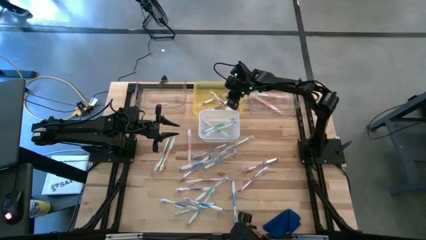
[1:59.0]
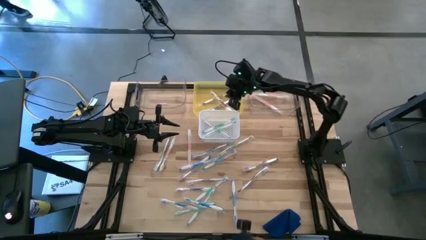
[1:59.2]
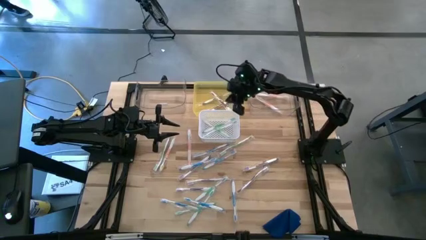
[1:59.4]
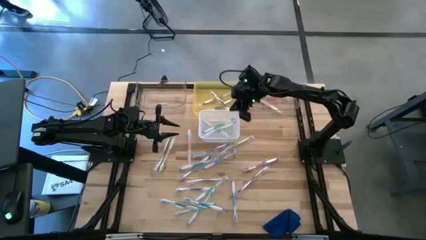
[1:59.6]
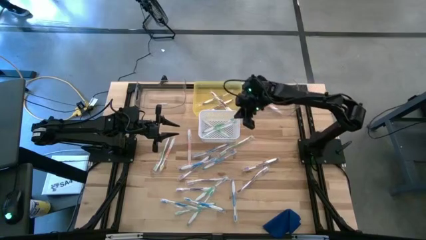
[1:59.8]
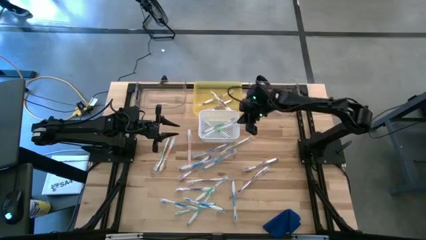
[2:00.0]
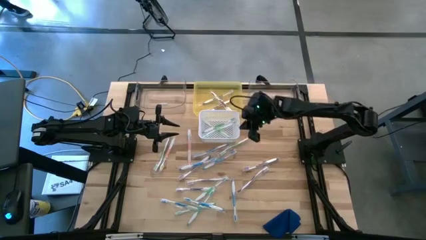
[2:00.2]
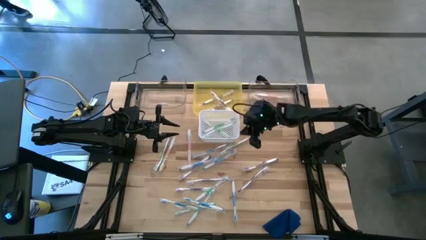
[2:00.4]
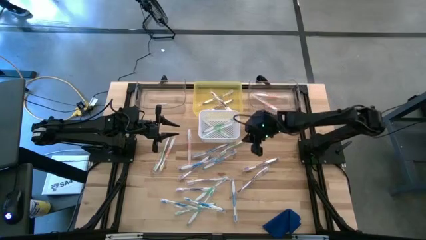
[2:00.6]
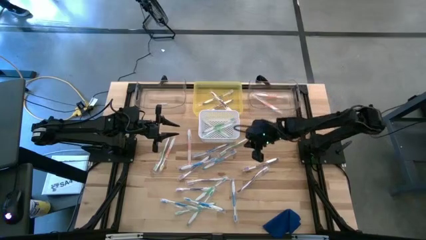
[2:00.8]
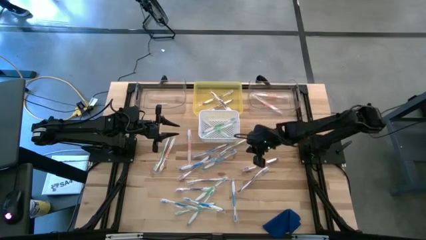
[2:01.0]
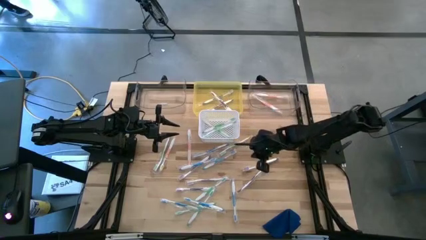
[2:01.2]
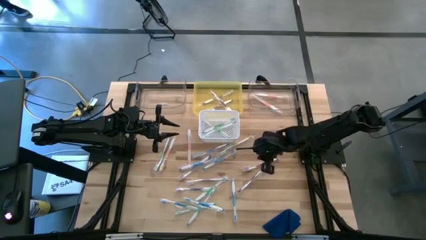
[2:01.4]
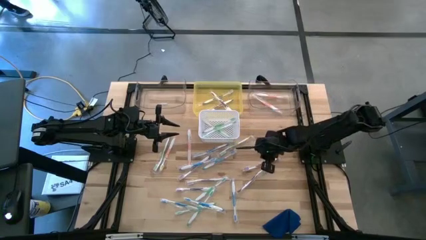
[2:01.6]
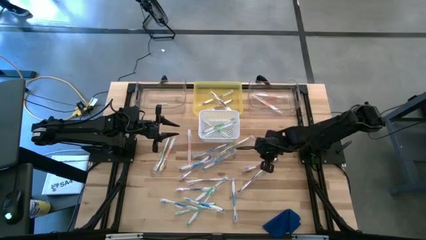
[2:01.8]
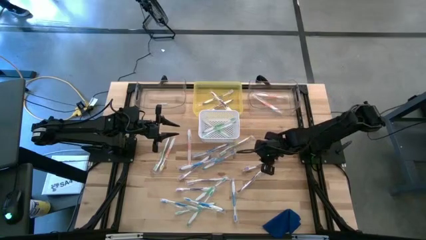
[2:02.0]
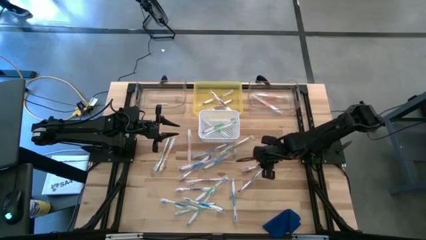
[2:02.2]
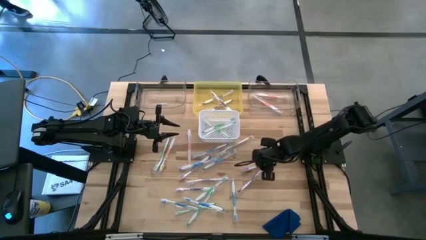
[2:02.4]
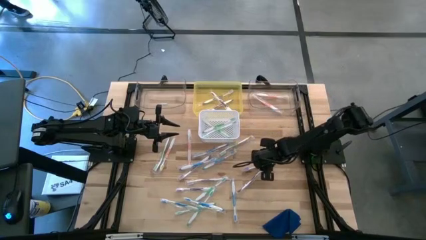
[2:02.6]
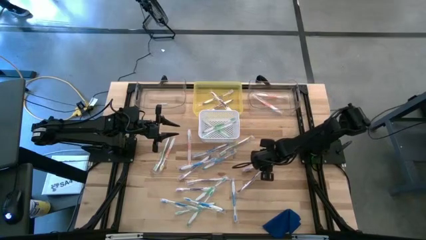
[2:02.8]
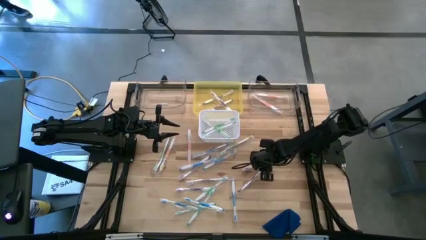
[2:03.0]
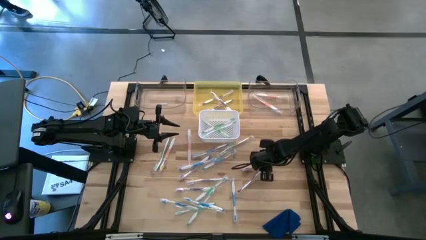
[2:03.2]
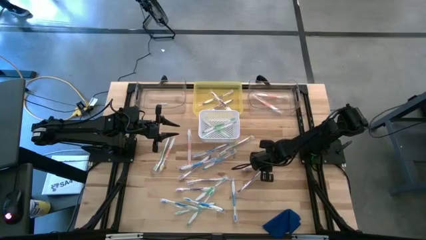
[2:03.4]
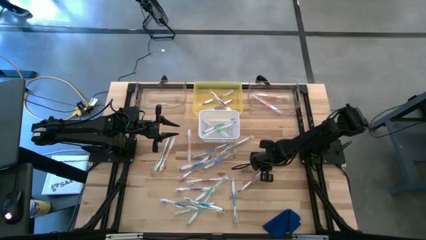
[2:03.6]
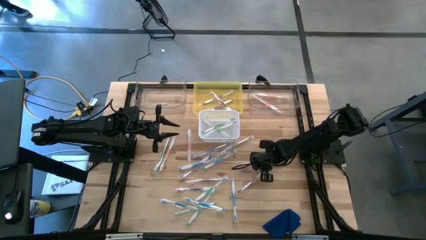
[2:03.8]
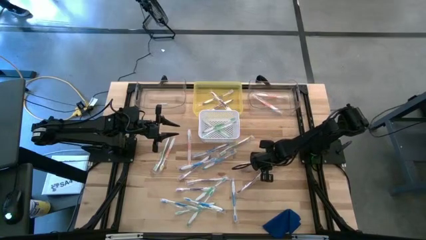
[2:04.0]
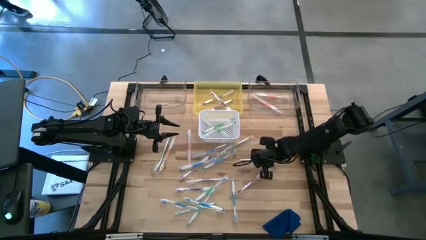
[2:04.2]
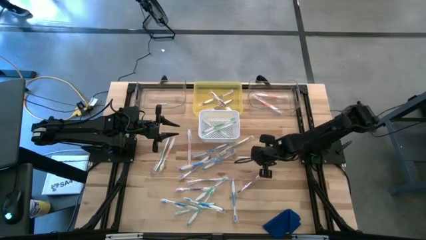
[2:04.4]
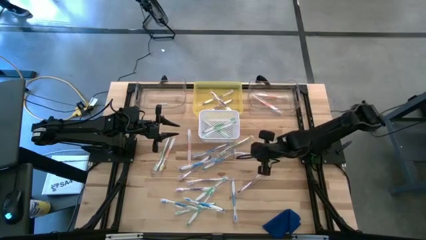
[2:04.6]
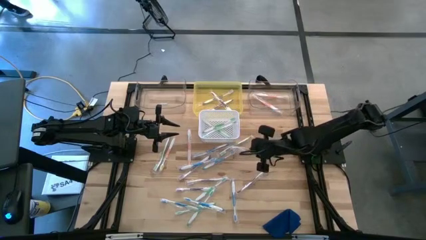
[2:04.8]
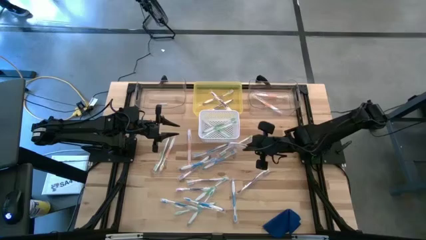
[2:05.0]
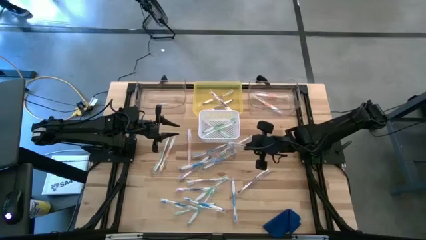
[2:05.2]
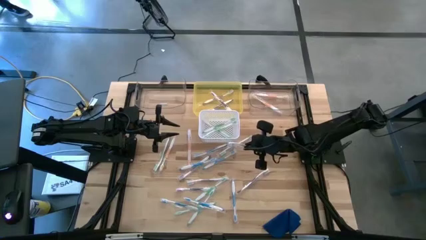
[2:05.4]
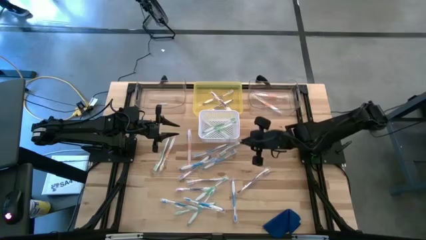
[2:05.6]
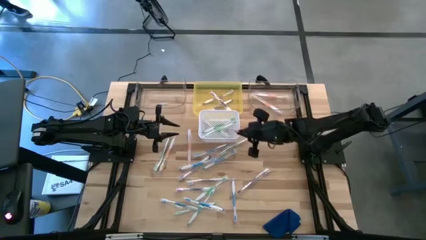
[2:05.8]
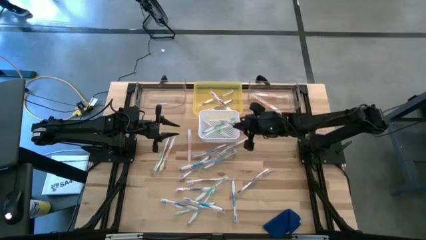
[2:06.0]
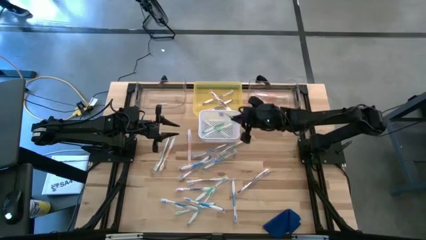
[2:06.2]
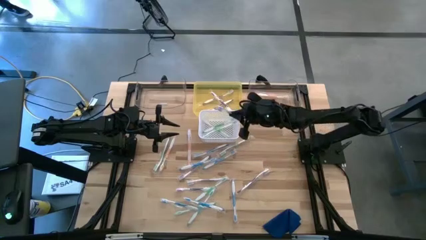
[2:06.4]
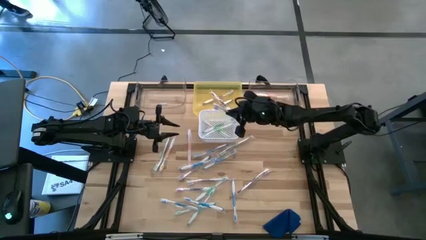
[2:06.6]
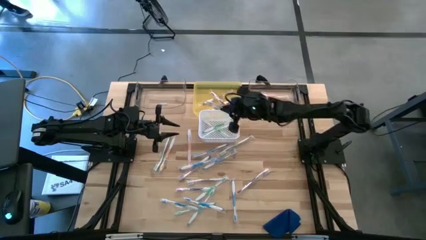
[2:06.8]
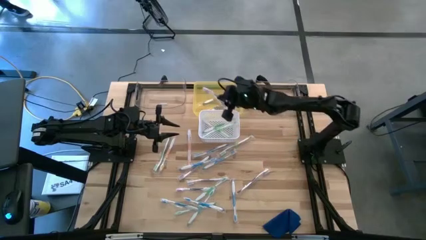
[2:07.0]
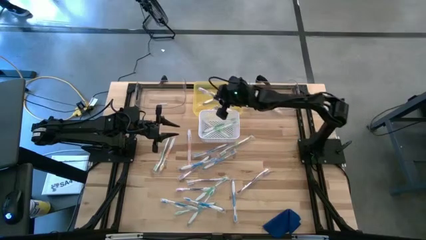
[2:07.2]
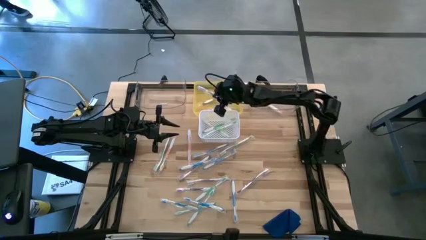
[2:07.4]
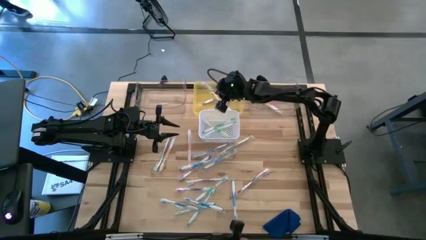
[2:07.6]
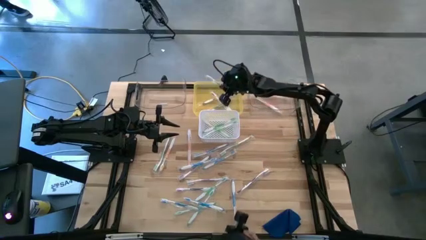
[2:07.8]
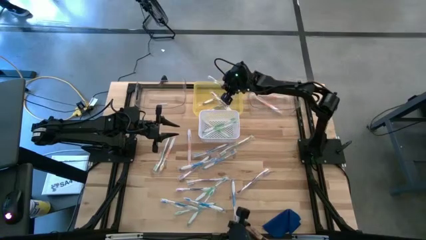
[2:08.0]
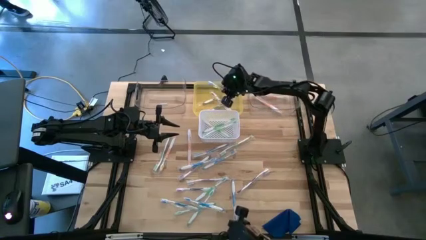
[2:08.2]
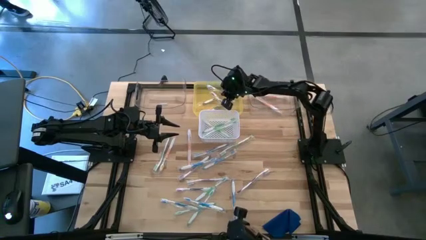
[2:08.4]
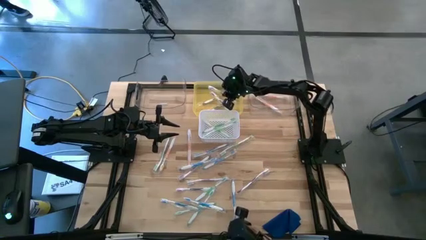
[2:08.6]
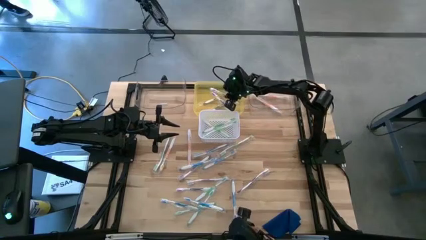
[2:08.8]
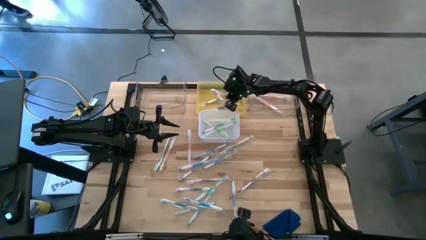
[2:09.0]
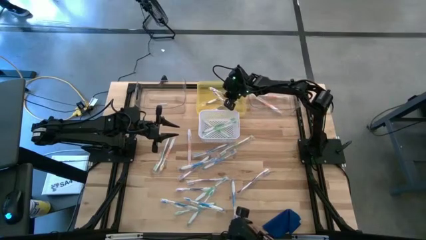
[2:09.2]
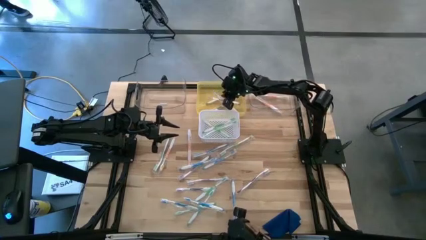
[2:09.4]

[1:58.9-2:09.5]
Task: Pick & Place Toothbrushes
Put the purple toothbrush into the yellow bin

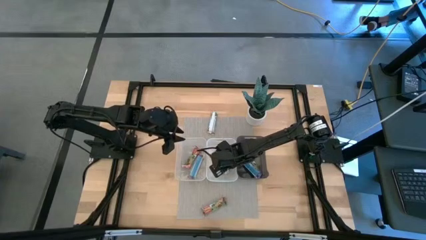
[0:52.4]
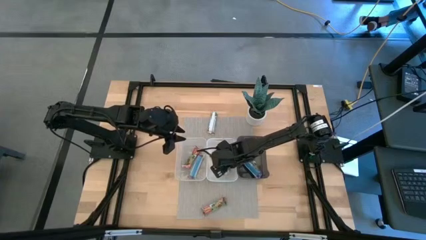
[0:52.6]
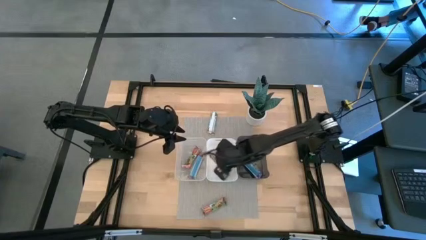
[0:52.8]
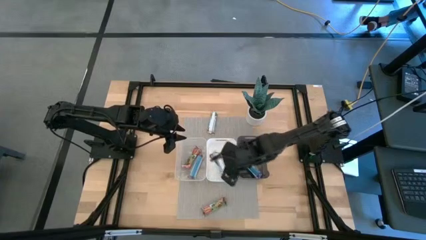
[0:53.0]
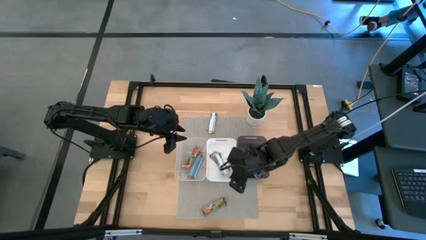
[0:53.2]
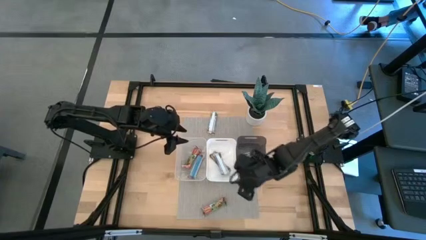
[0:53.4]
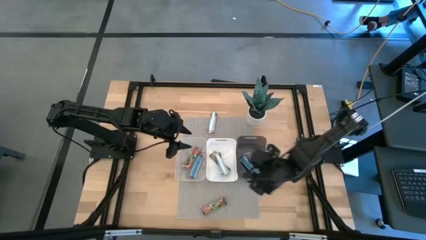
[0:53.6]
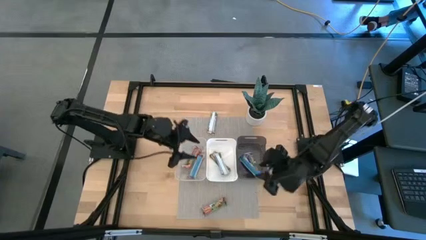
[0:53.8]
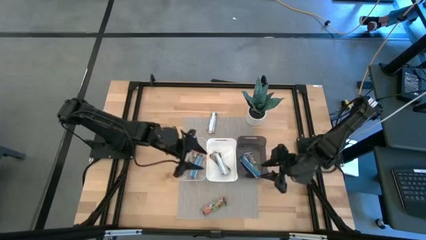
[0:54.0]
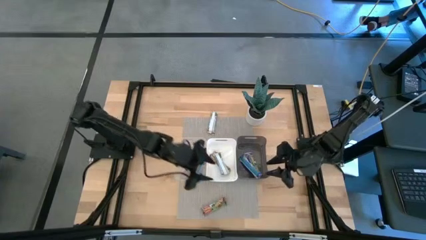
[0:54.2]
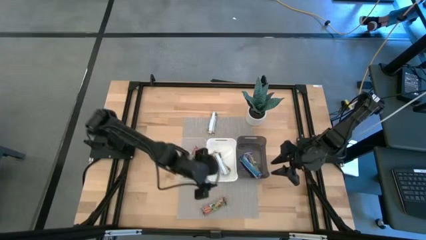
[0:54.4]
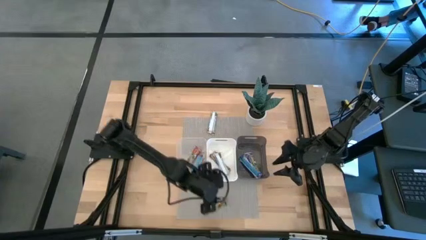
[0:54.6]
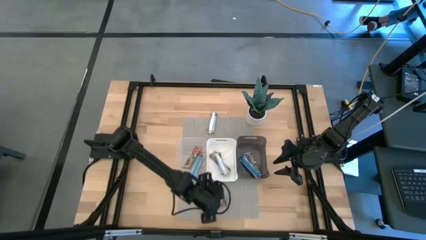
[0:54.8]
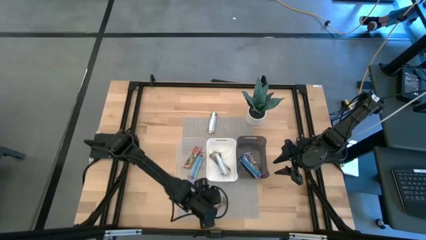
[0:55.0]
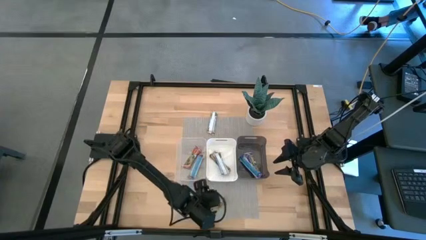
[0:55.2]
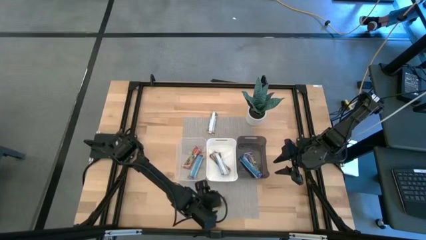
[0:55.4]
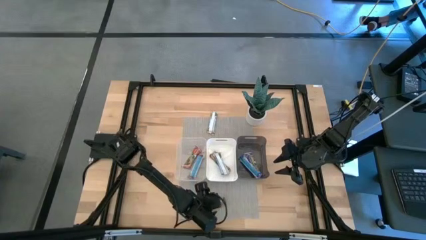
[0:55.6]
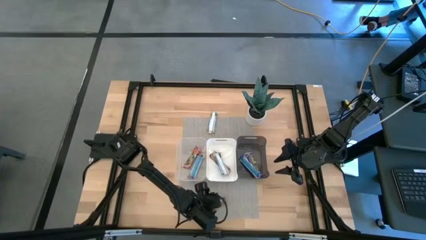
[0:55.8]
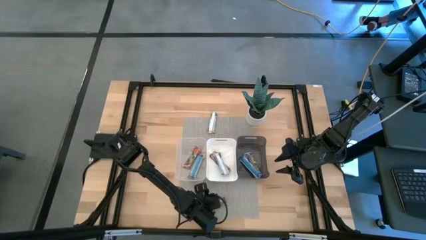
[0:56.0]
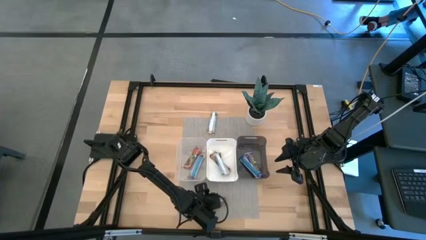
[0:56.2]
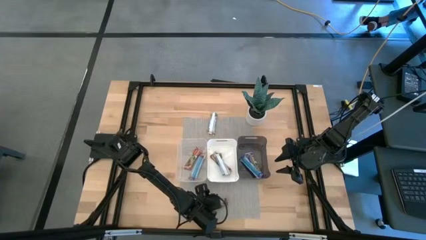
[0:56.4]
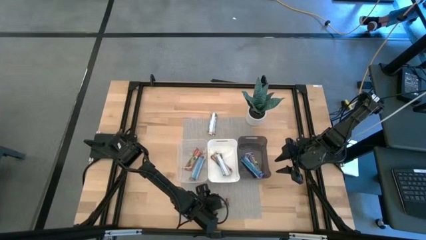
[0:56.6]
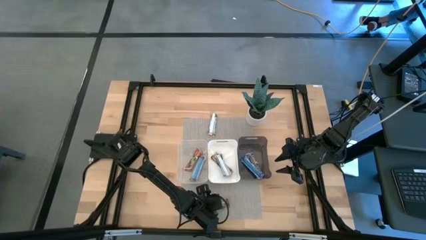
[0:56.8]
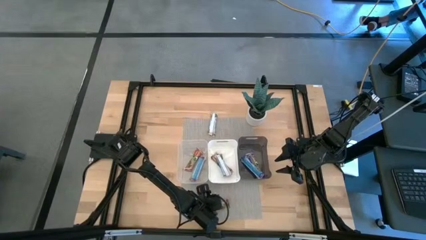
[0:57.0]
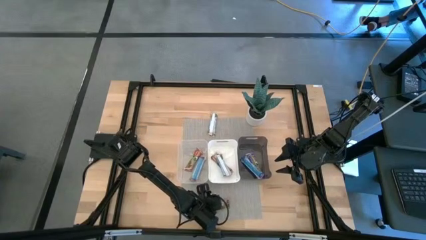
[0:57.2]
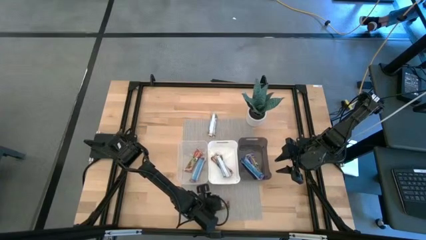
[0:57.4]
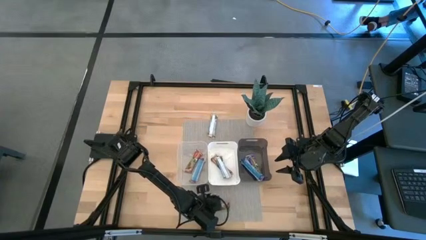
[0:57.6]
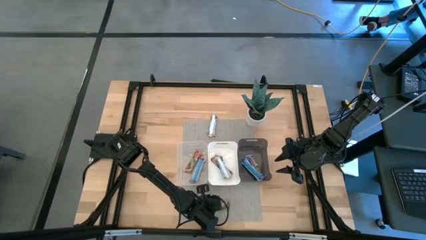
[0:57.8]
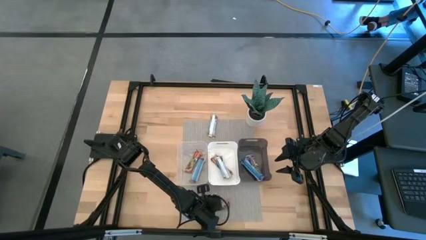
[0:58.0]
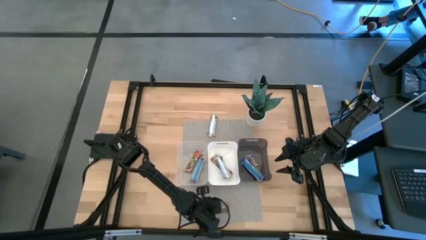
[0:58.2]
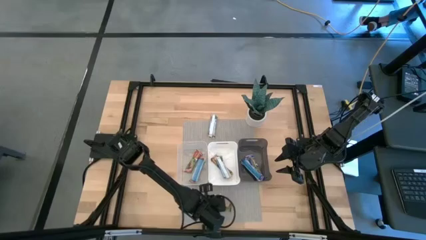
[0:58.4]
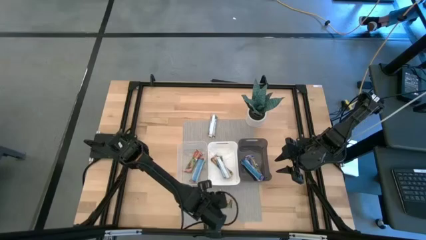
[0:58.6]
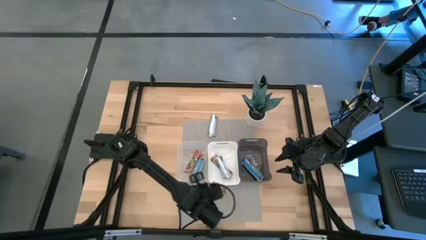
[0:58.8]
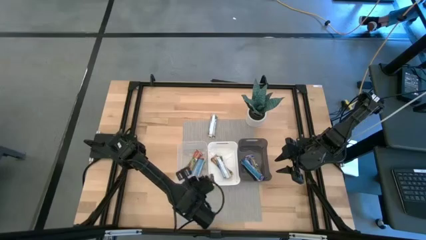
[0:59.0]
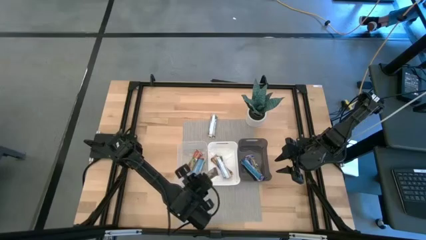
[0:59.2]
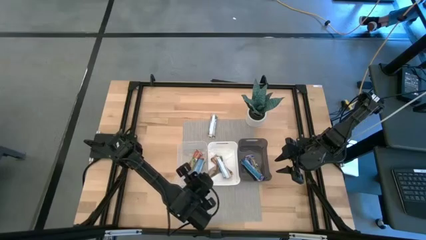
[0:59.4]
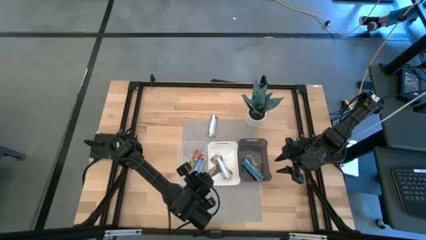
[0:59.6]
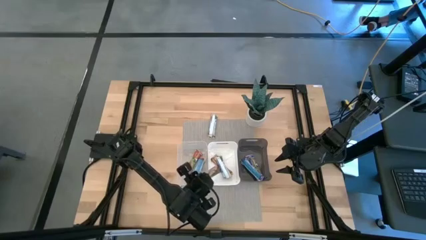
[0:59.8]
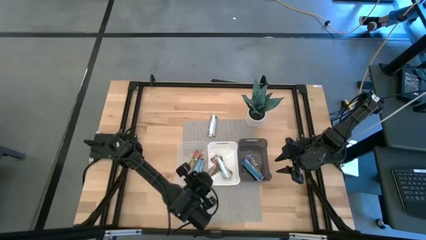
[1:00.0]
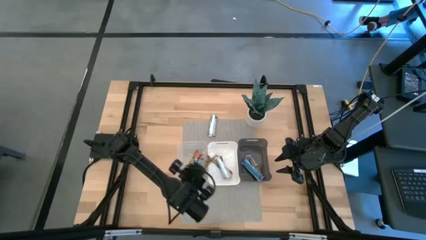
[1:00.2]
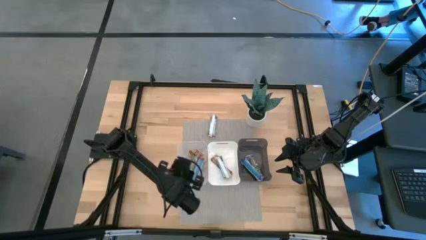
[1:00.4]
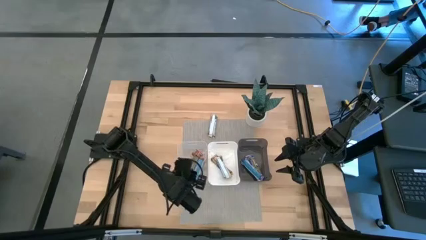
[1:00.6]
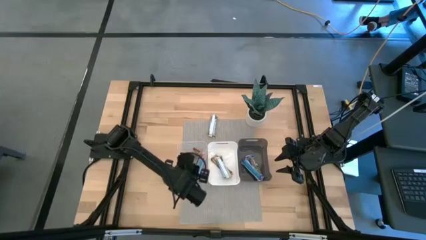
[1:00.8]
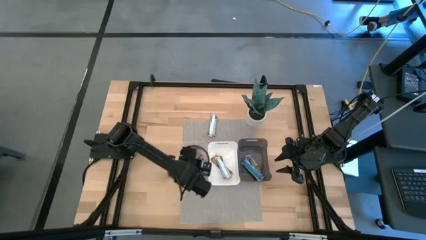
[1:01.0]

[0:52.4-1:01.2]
Task: Pick and place Granola Bars by type
Put the red granola bar into the transparent bin
